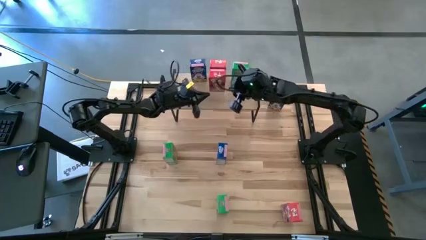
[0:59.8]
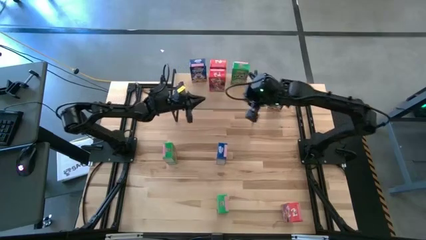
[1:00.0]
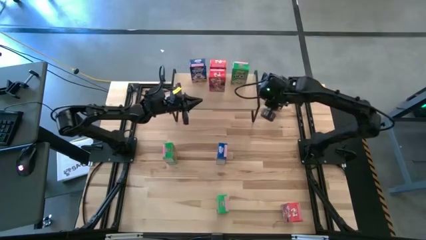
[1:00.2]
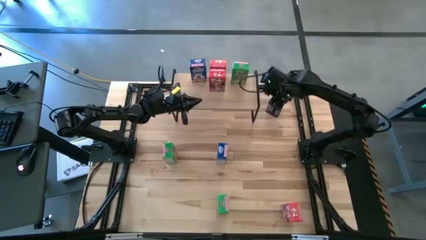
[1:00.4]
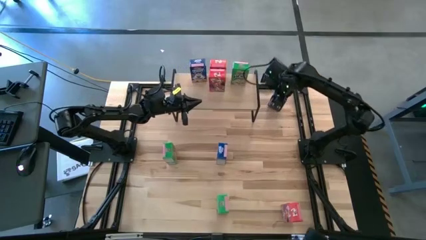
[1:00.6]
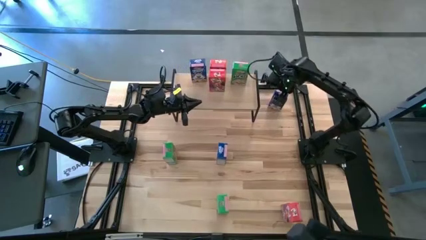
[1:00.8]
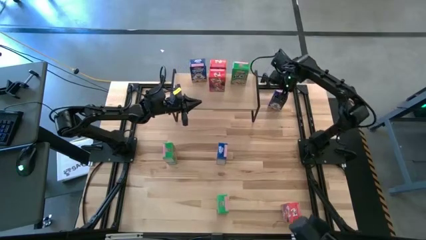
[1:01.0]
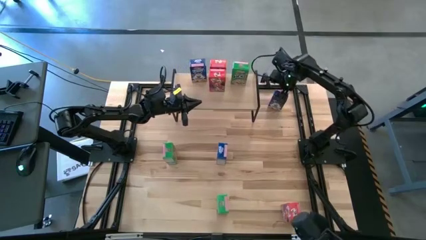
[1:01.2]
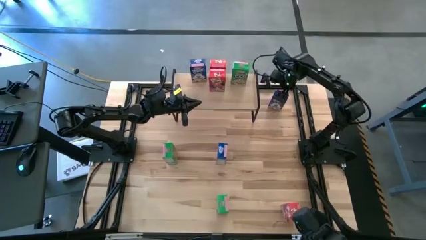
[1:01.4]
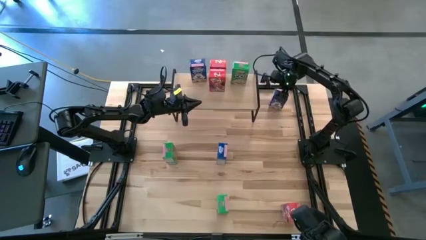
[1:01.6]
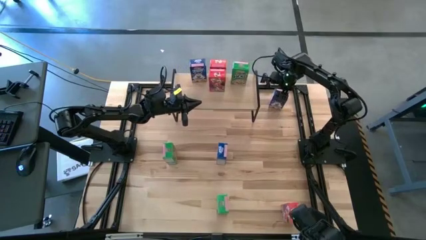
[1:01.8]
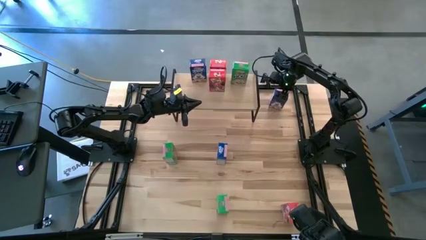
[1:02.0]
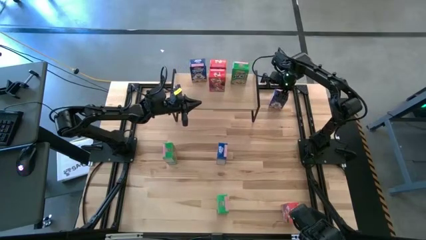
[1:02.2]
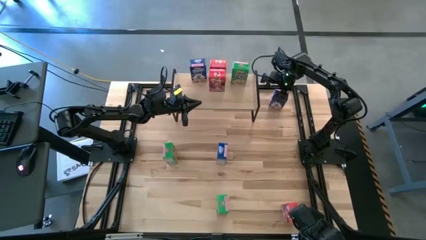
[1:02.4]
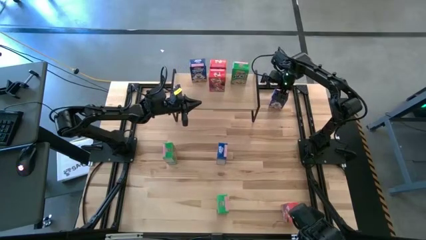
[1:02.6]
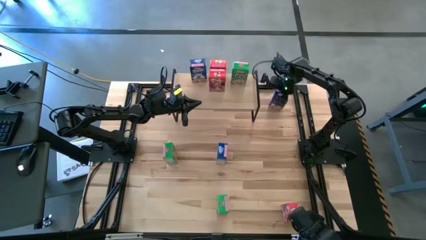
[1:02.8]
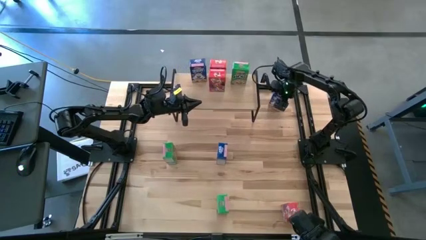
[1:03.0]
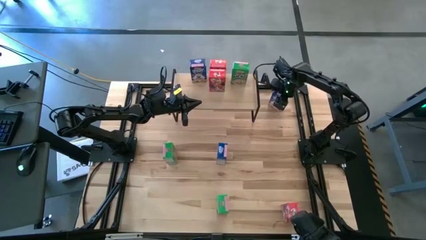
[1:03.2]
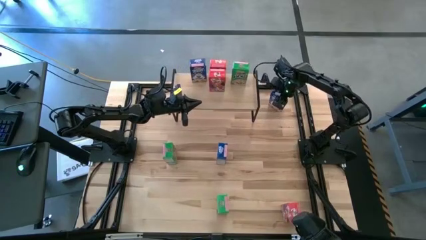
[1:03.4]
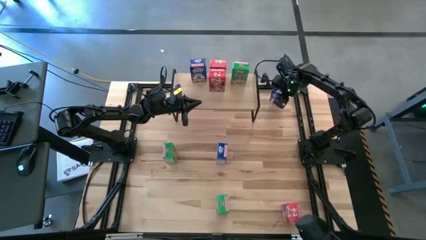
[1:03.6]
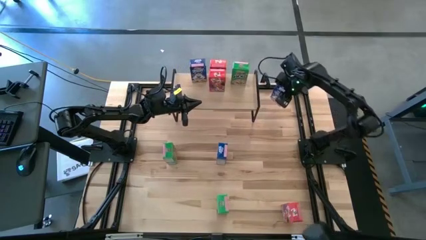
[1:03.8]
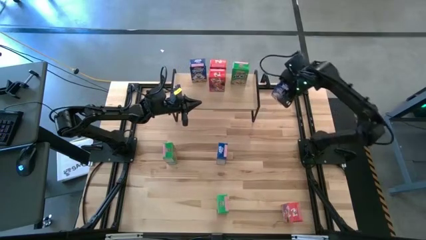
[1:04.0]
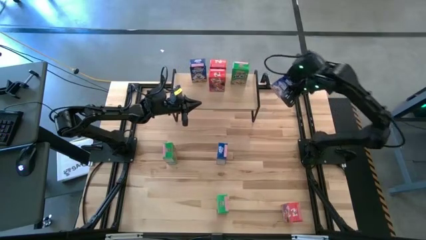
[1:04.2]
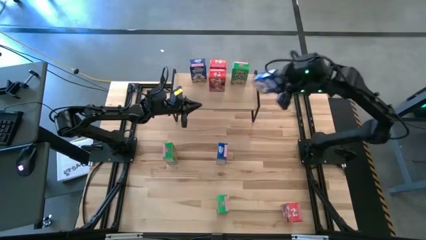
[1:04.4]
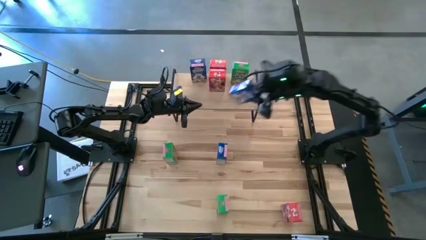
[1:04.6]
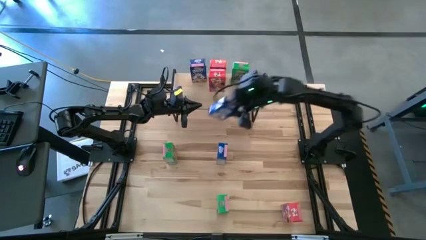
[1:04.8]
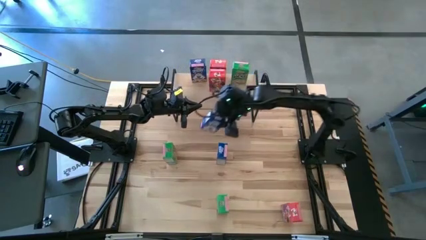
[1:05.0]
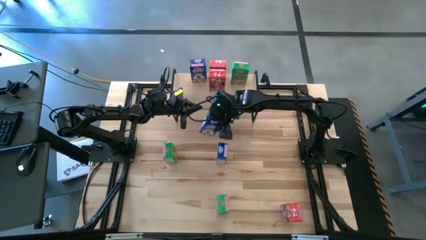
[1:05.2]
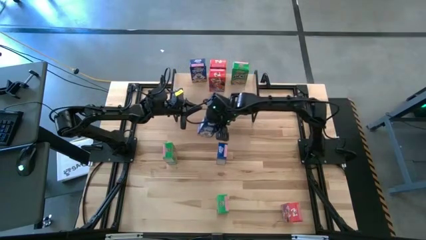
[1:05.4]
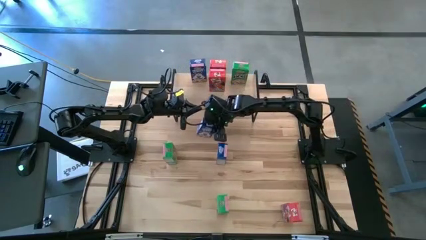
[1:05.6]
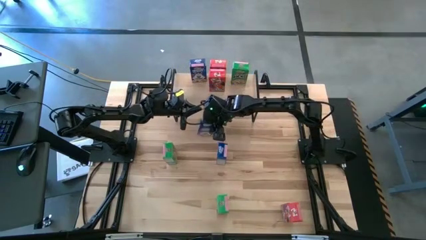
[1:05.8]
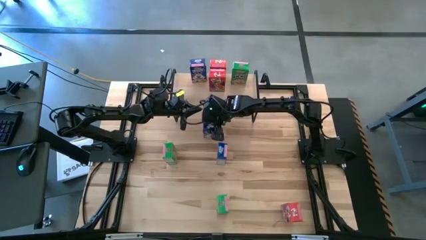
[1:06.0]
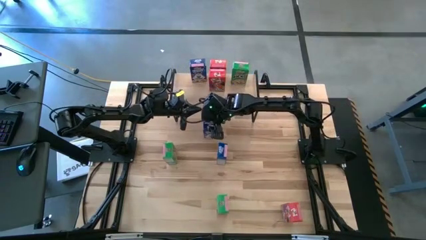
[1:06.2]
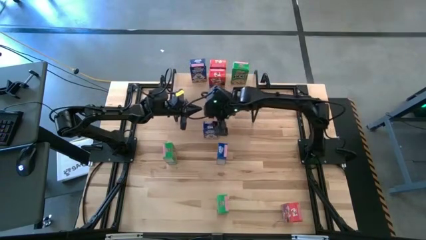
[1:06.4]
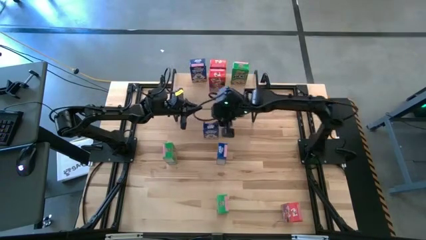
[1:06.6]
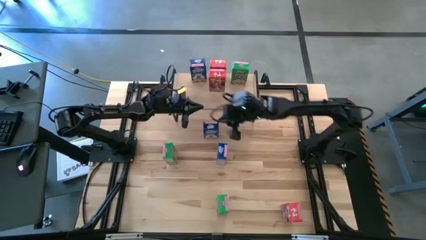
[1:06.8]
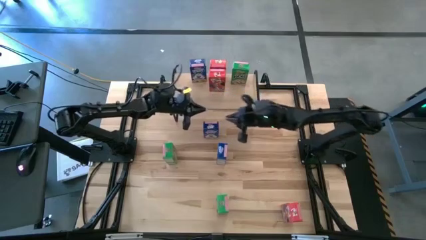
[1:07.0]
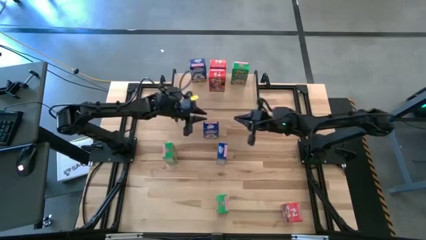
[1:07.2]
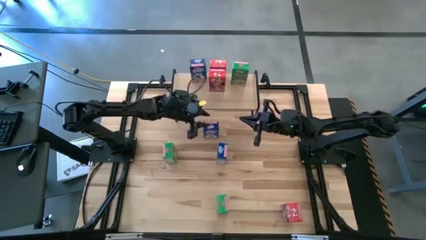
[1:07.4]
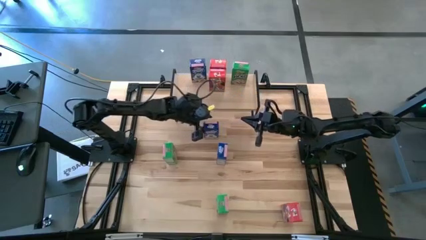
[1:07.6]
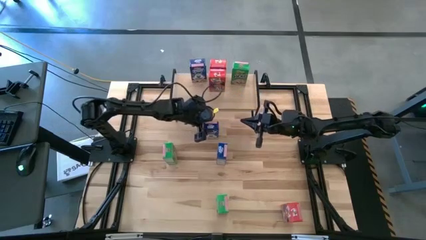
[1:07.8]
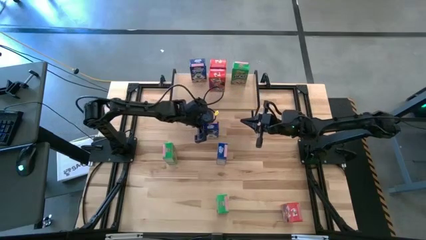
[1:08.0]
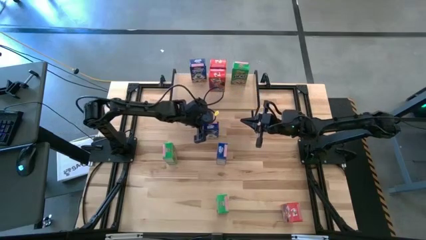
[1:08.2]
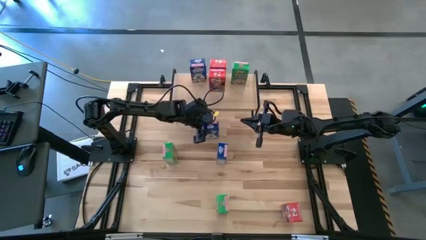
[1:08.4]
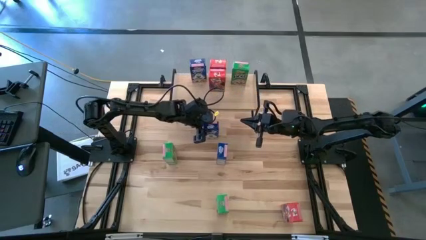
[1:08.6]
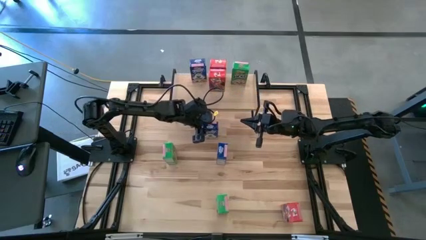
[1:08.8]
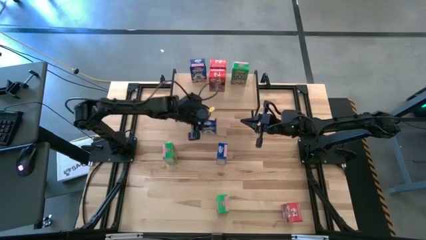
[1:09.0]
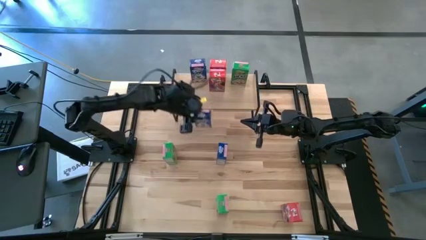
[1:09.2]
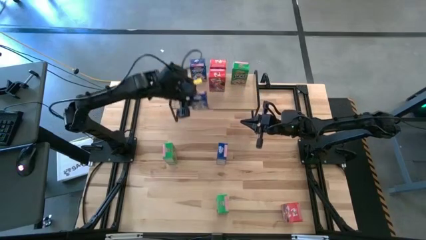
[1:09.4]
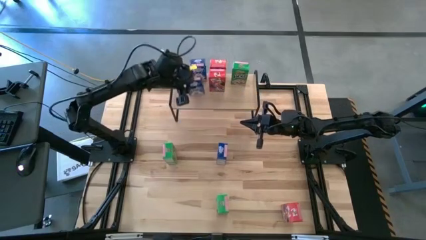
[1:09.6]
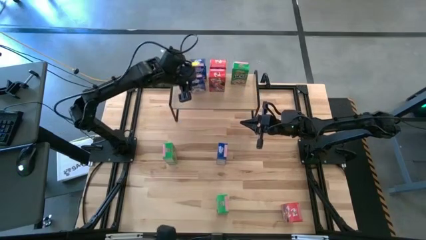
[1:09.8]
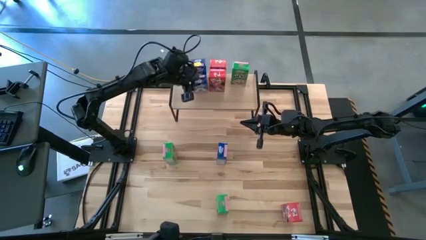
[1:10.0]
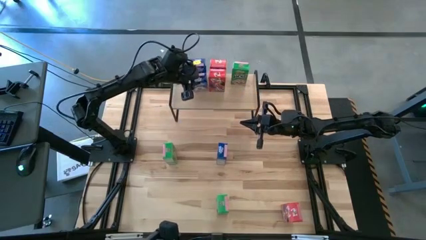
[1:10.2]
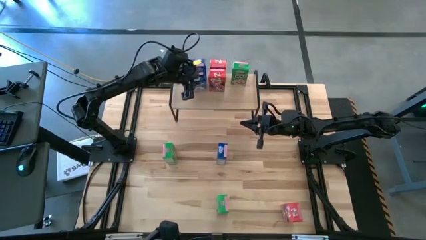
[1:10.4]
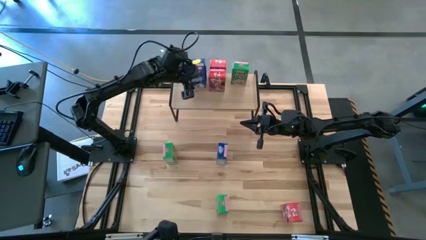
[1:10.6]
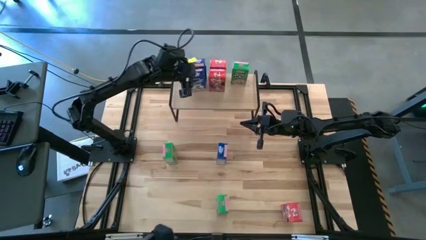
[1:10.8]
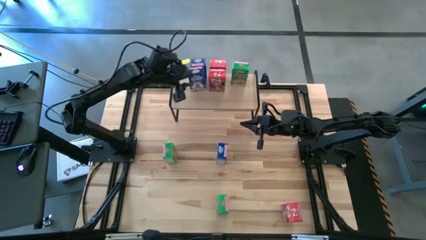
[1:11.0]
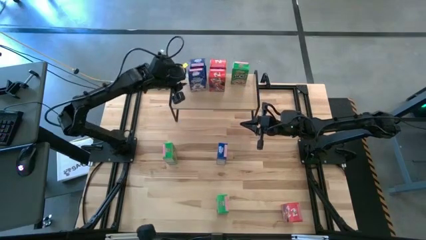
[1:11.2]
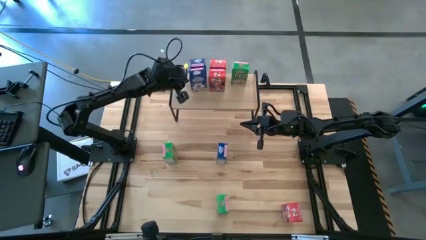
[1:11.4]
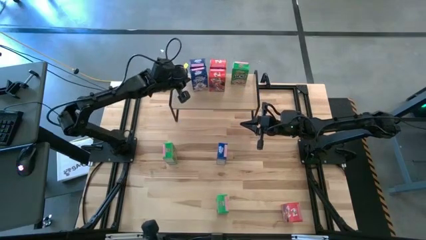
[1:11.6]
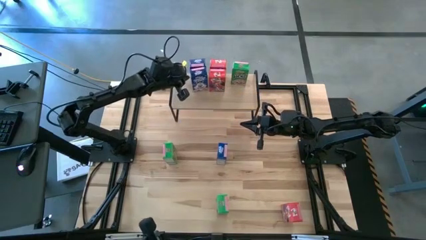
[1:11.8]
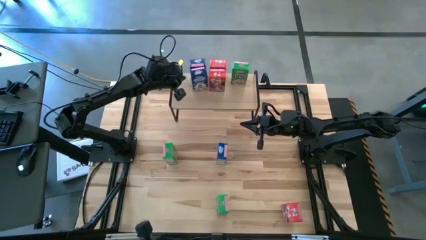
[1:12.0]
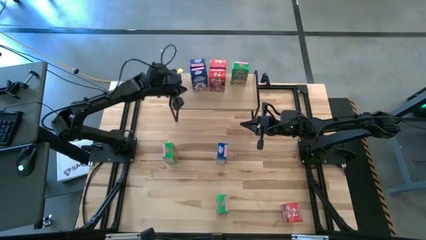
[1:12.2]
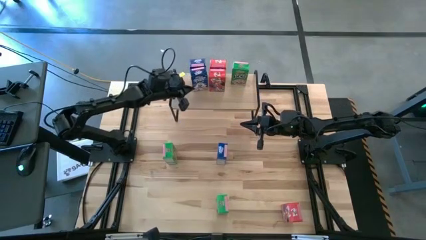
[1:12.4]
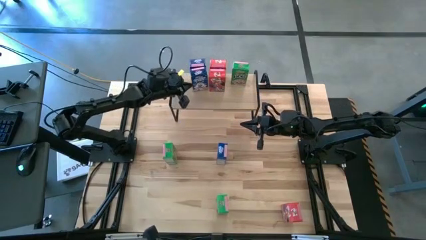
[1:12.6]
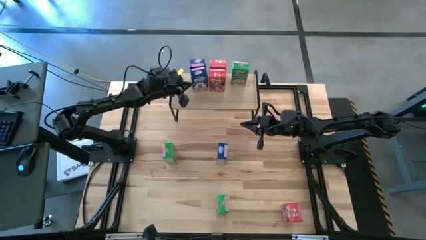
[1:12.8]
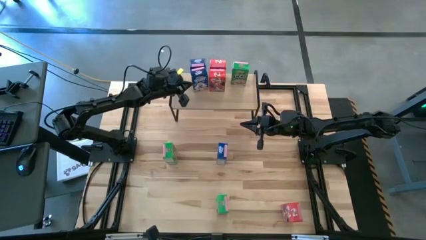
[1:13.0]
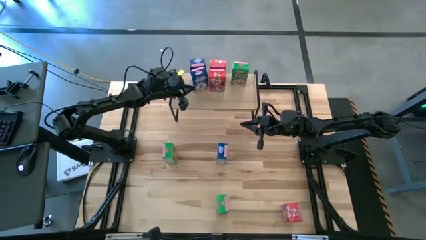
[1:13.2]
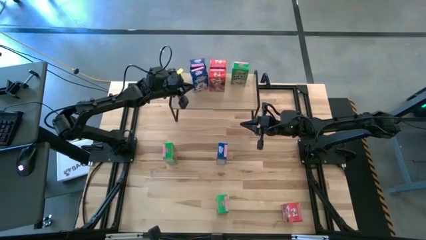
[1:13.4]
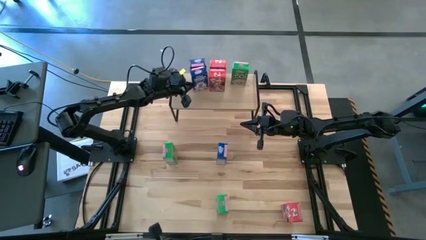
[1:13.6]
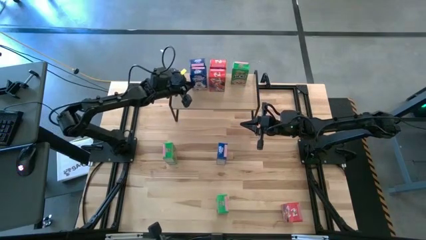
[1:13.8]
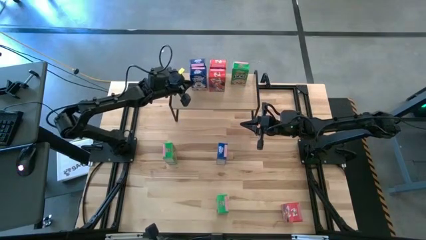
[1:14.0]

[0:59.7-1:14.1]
Task: Stack cereal on shelf
Put the top blue cereal box aligned with the other blue cereal box on the shelf
